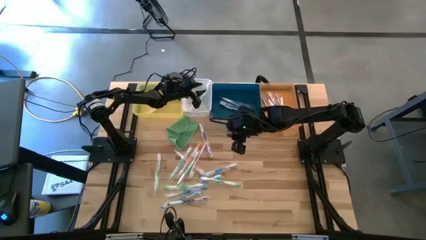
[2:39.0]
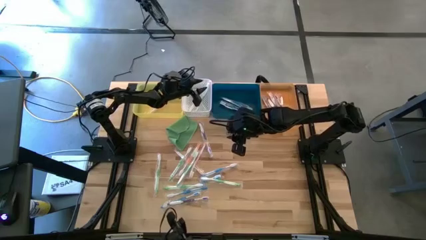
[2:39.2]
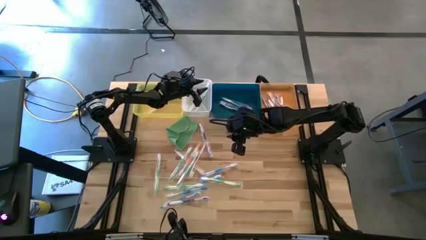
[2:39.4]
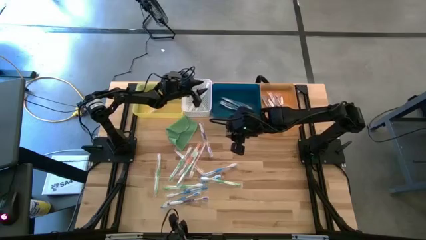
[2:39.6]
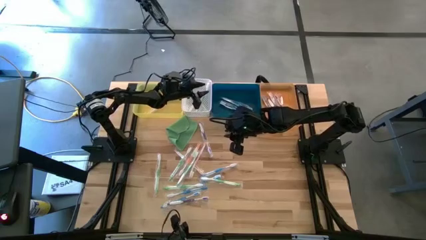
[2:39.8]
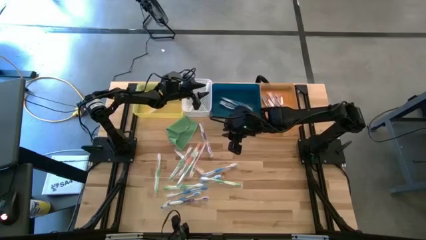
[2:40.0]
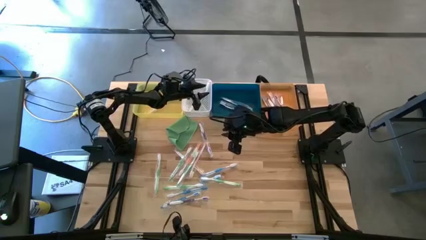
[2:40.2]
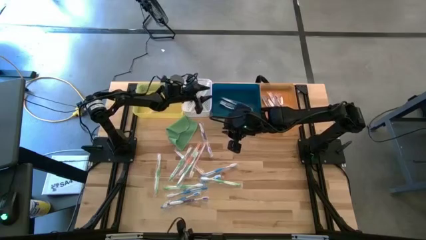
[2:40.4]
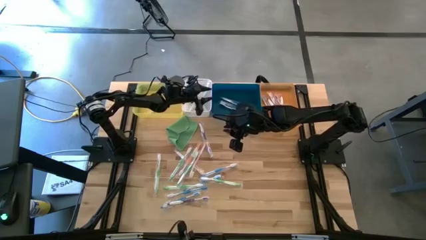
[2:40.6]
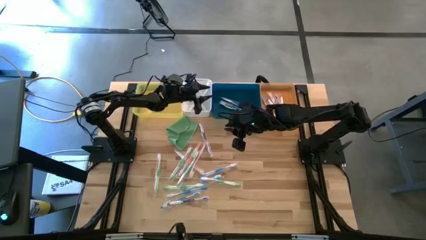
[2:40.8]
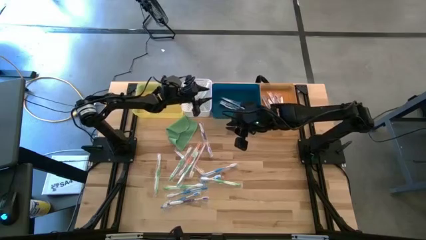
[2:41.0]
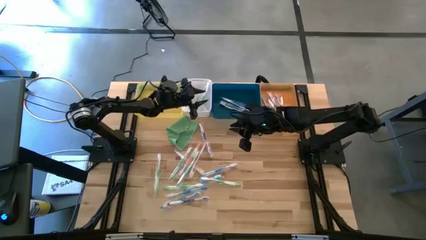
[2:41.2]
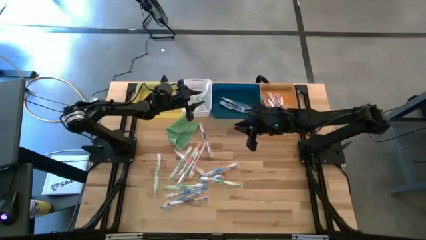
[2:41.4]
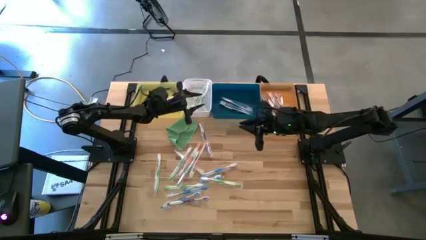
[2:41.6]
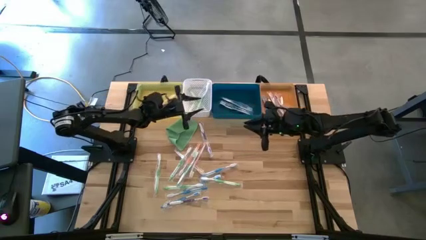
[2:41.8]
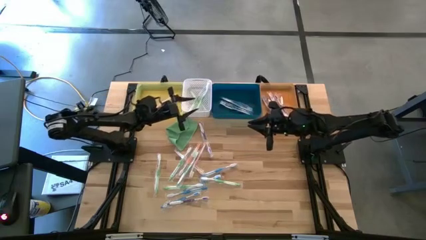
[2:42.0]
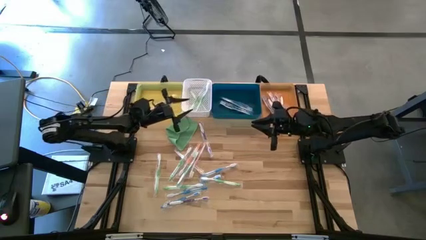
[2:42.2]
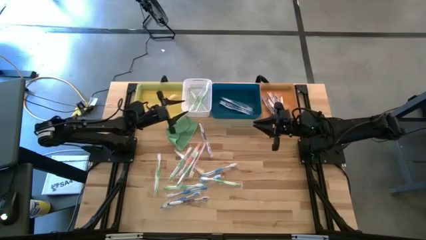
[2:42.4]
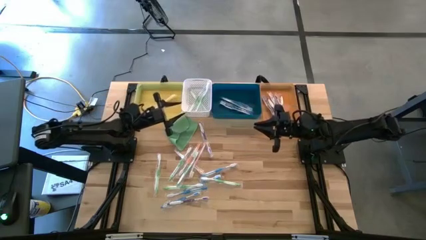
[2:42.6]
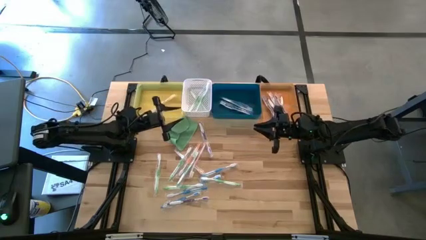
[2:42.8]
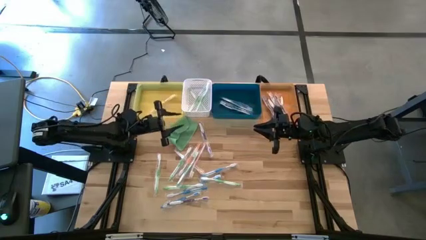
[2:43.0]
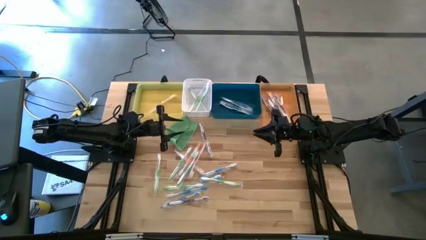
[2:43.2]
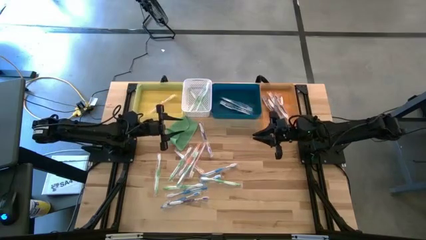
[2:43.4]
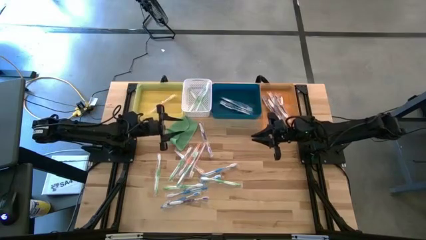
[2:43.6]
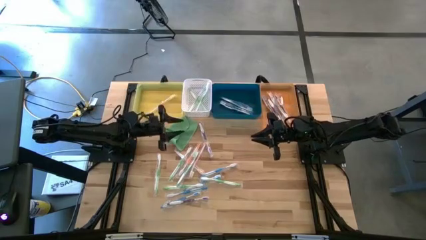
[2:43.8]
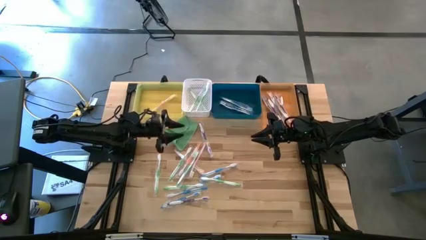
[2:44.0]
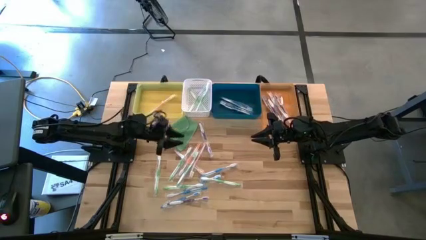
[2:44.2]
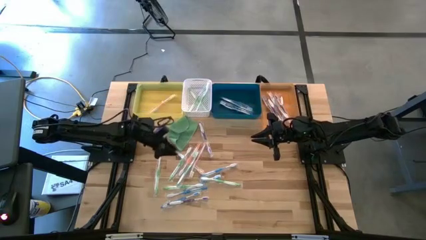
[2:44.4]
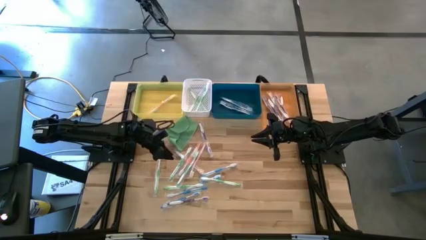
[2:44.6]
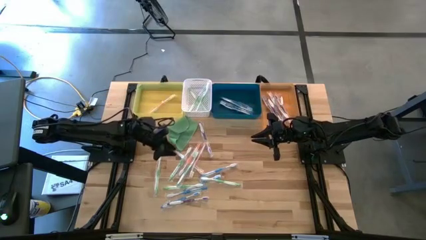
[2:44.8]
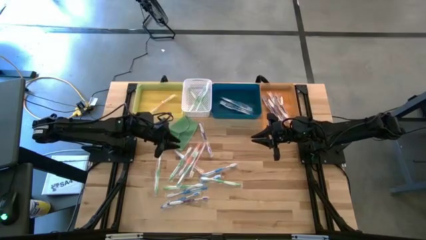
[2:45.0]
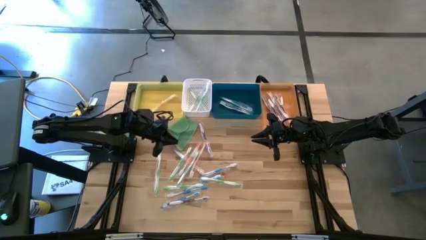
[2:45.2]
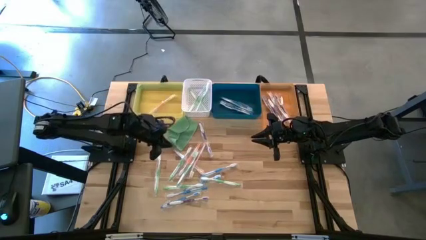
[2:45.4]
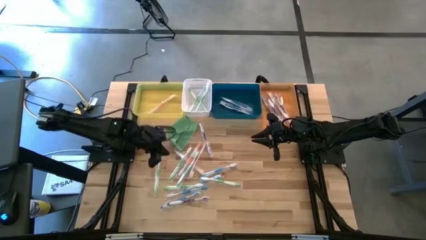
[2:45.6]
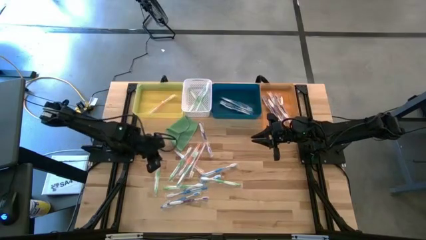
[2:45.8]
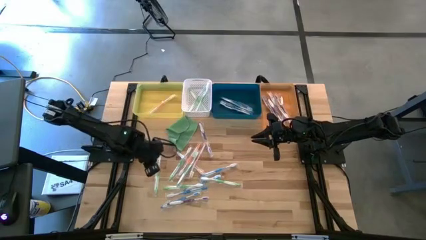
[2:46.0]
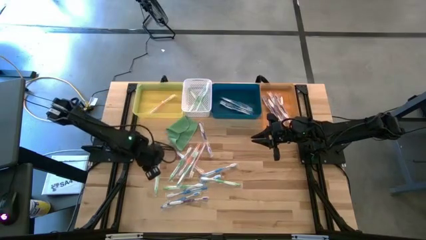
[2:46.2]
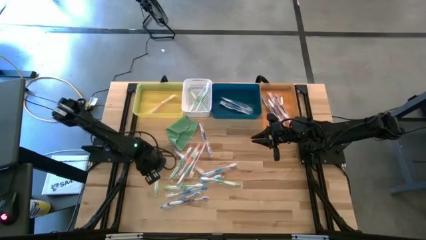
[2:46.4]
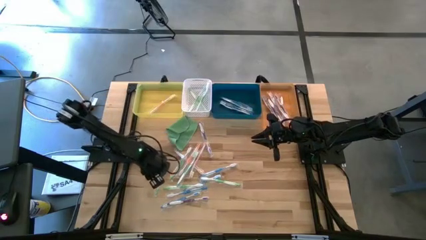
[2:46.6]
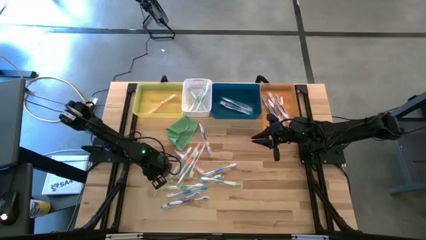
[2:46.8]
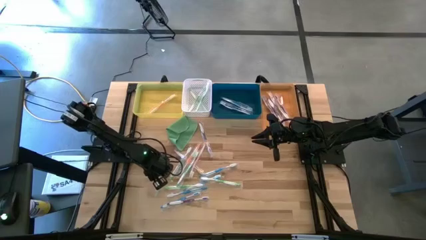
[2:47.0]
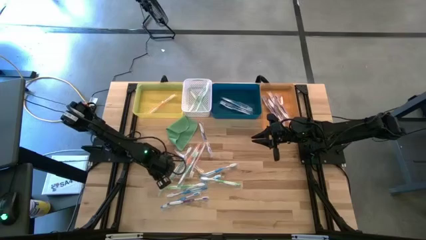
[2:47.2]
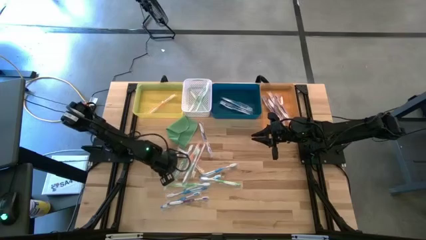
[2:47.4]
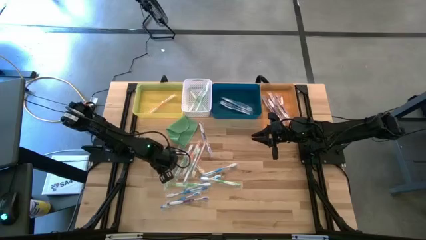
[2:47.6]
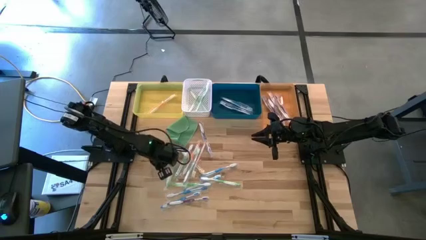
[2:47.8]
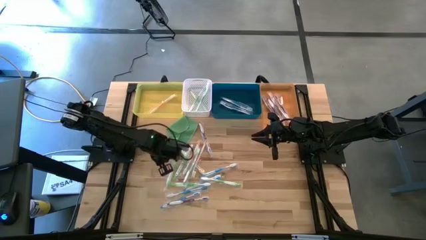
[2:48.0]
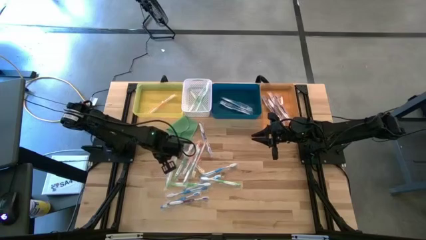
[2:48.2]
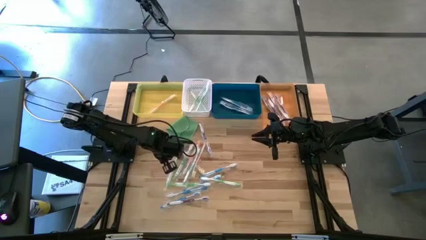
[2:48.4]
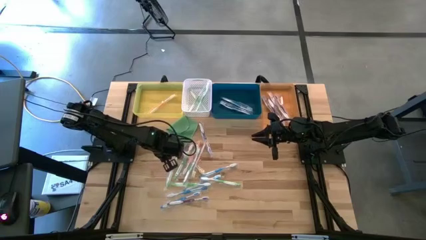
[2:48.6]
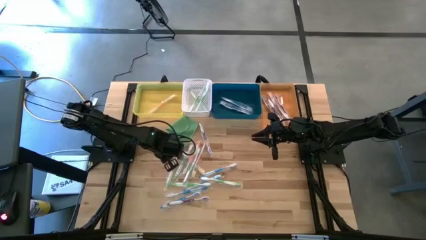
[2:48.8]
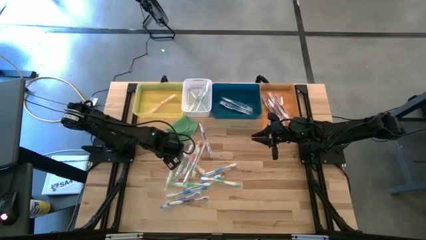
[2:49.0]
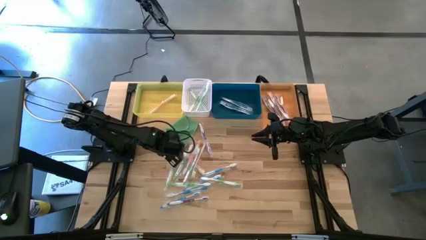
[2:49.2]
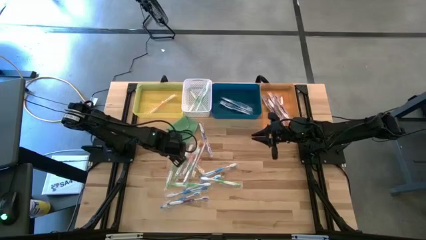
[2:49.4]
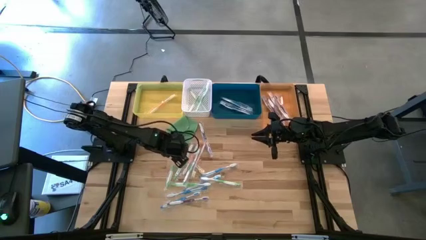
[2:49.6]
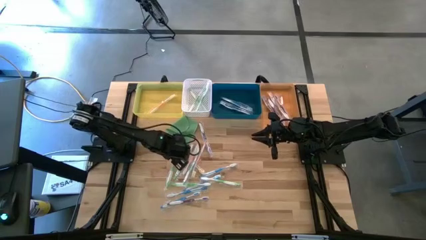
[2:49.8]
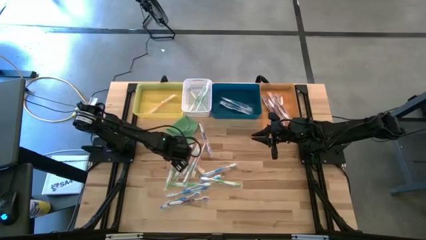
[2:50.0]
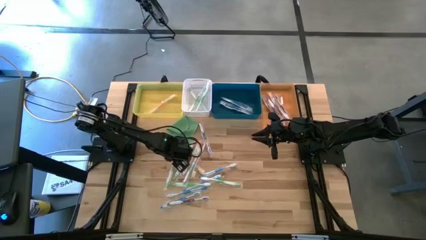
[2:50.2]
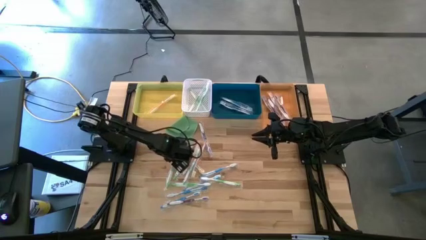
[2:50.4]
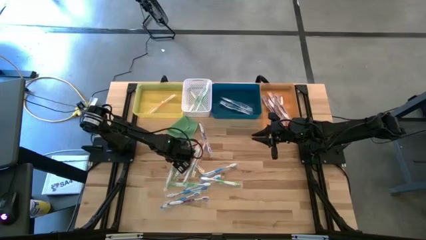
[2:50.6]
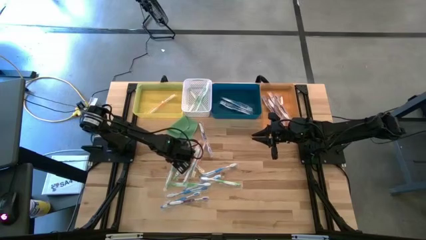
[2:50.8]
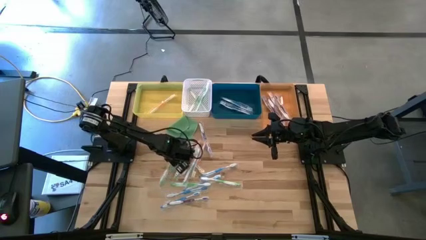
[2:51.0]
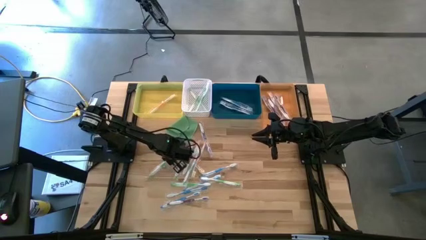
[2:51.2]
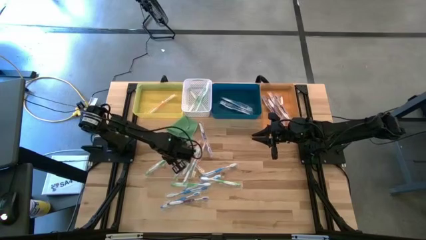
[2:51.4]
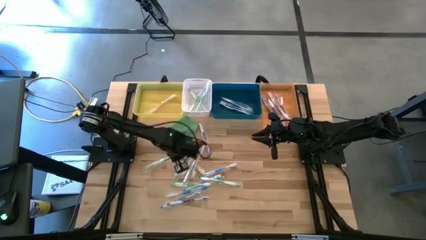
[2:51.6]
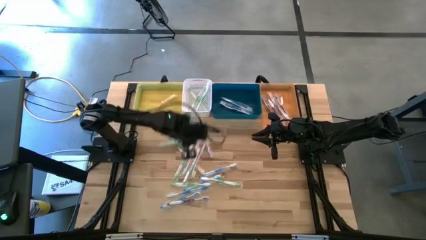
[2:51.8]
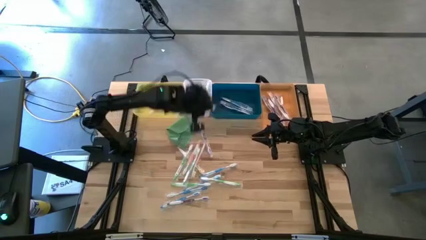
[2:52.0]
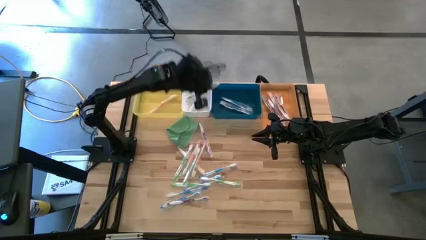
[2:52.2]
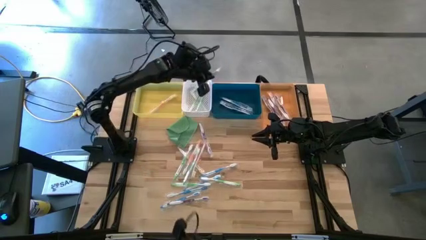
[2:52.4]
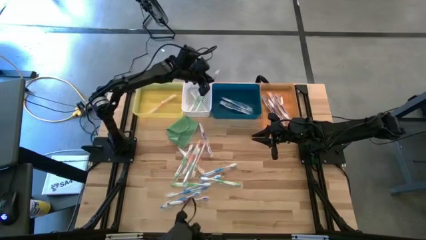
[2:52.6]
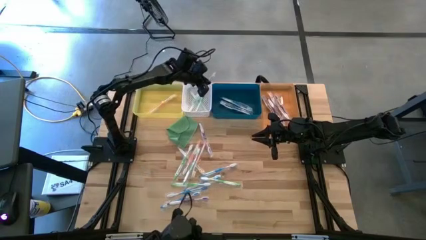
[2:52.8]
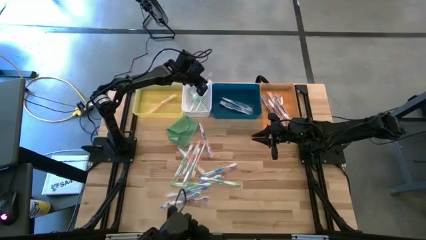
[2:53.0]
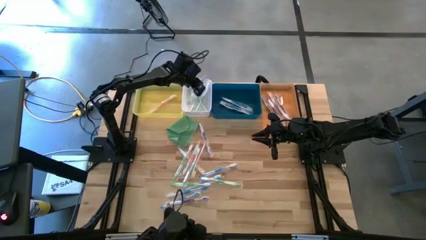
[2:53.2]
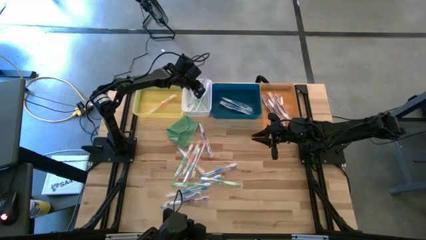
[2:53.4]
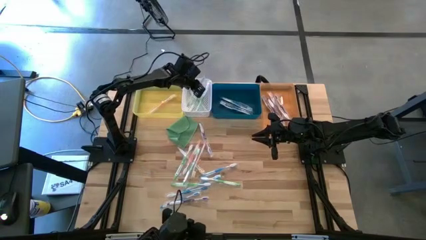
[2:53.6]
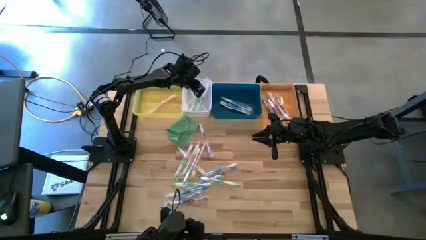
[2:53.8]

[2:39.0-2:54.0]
Task: Pick & Place Toothbrushes
Put the green toothbrush into the white bin

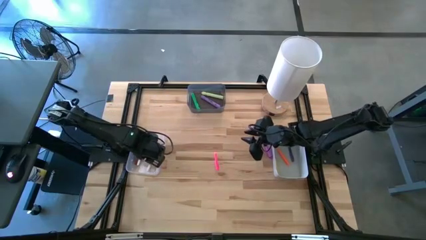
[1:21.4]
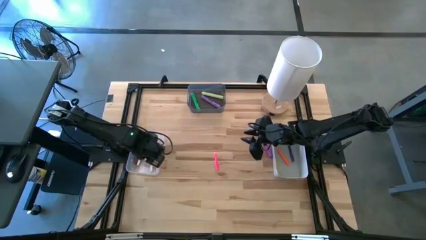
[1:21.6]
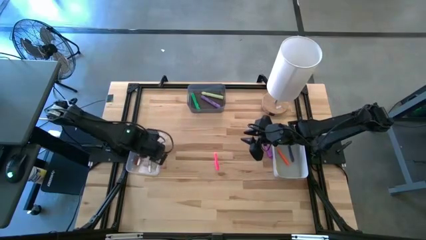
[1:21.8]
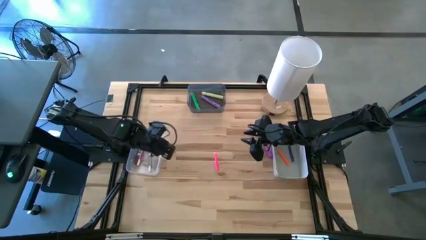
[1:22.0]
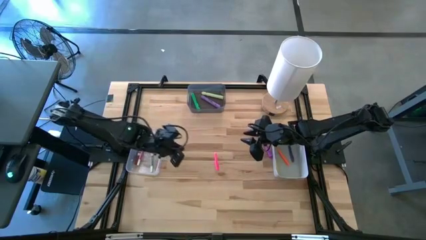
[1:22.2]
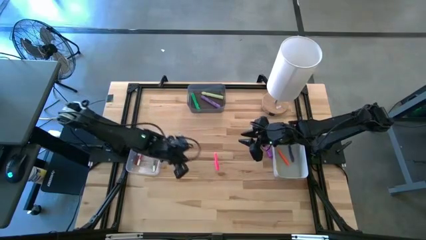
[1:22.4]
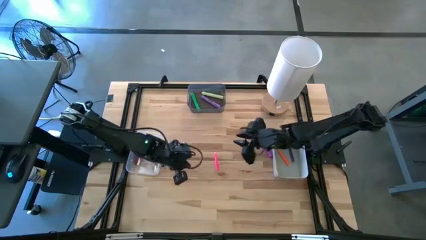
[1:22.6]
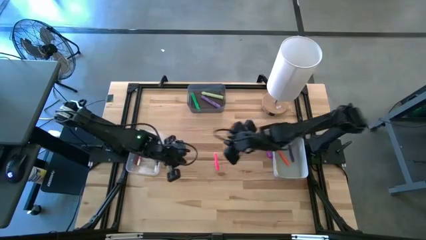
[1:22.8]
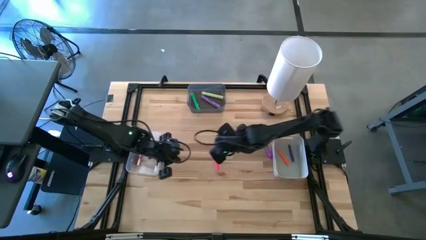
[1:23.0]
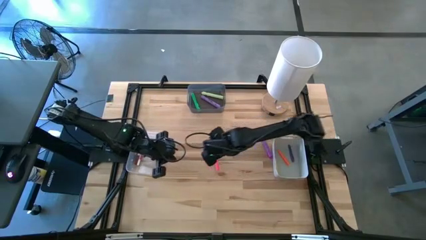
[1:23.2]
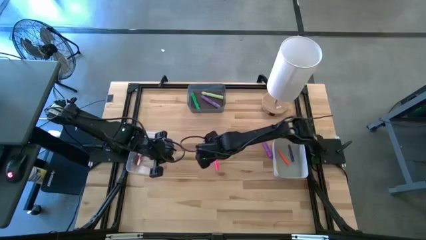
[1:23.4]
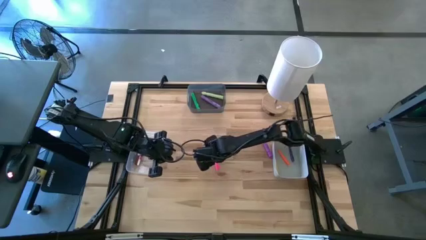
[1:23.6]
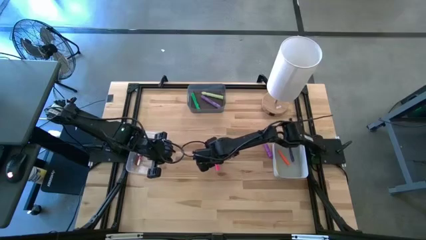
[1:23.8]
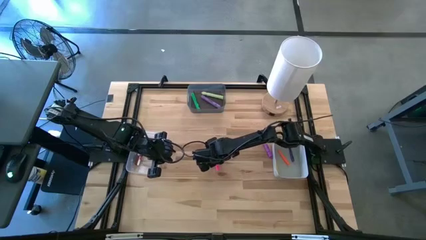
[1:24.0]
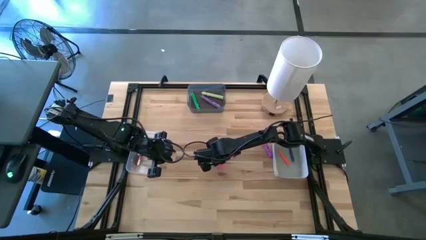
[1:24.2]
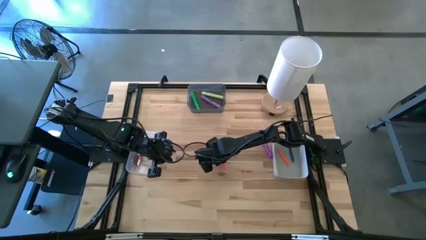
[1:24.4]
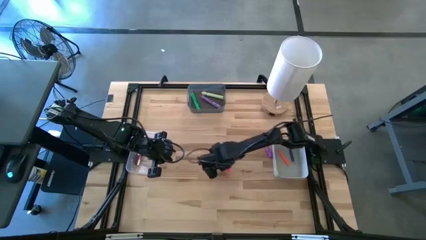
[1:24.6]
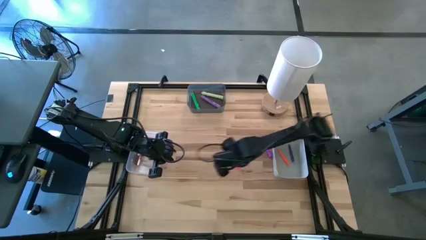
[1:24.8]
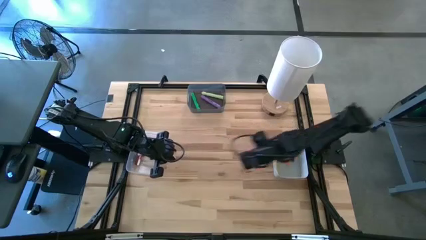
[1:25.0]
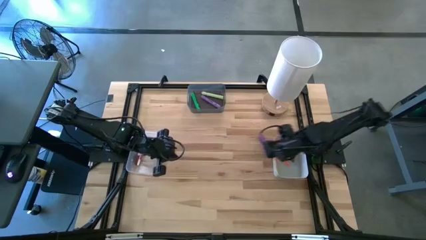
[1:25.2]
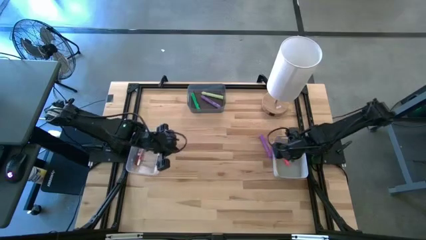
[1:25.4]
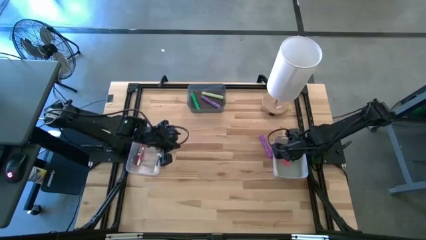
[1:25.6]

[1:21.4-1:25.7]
Task: Pick & Place Markers
Put the pink pen into the gray bin
